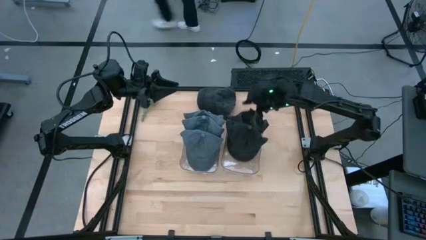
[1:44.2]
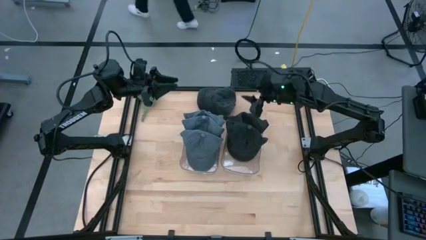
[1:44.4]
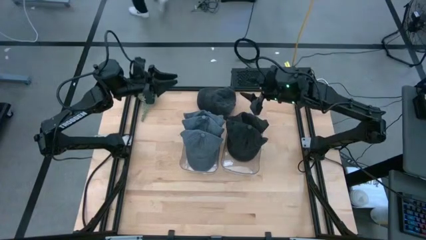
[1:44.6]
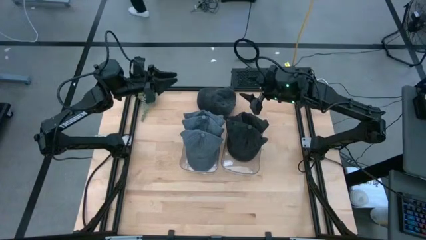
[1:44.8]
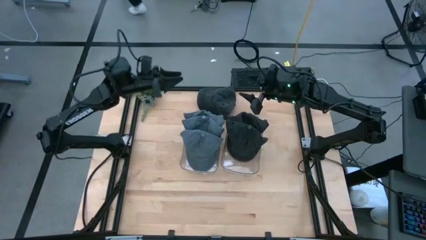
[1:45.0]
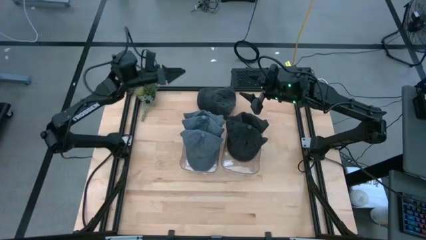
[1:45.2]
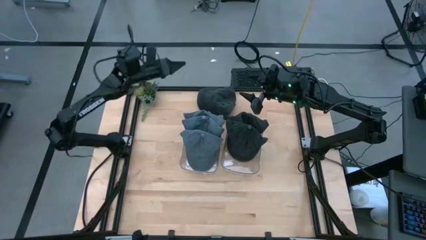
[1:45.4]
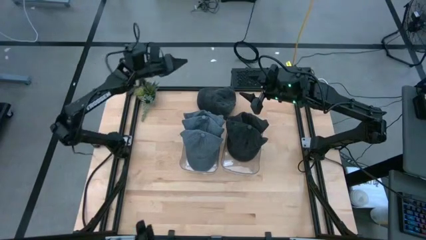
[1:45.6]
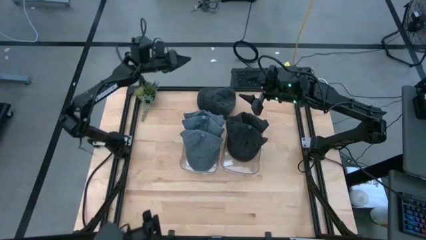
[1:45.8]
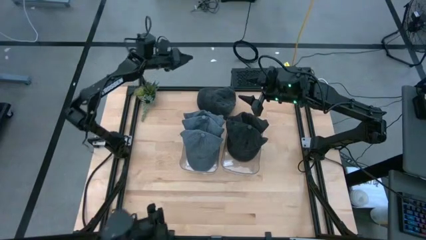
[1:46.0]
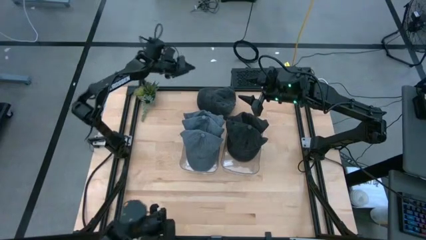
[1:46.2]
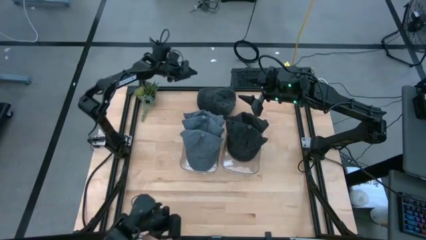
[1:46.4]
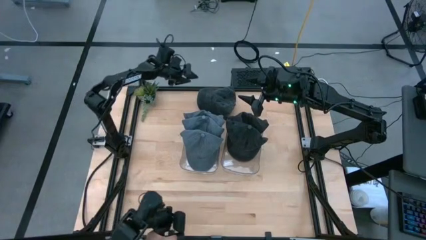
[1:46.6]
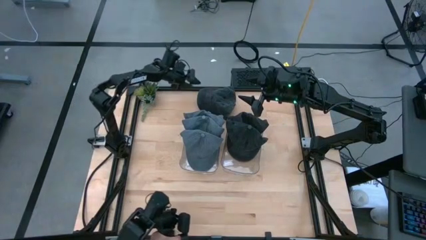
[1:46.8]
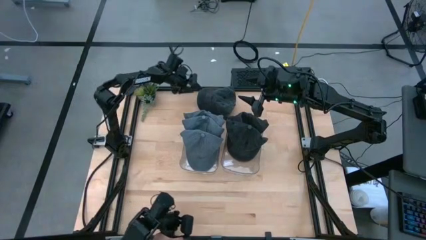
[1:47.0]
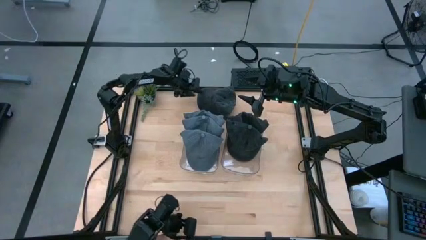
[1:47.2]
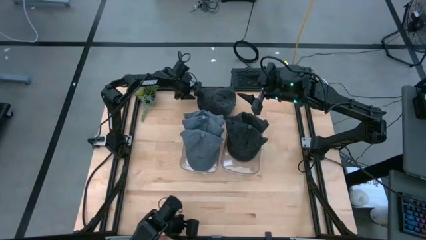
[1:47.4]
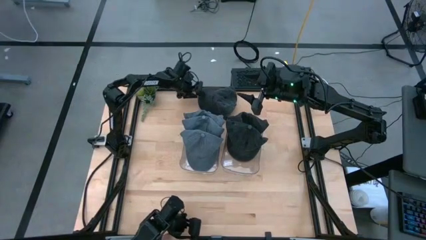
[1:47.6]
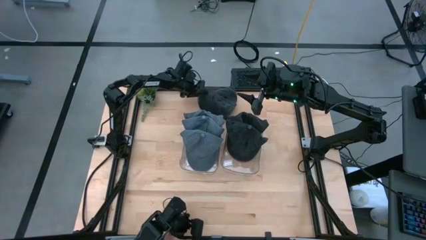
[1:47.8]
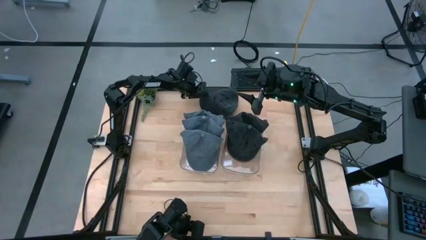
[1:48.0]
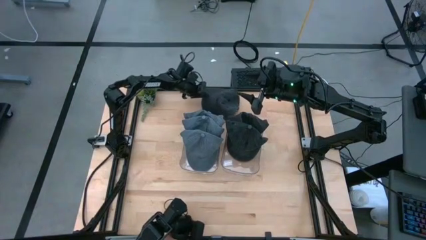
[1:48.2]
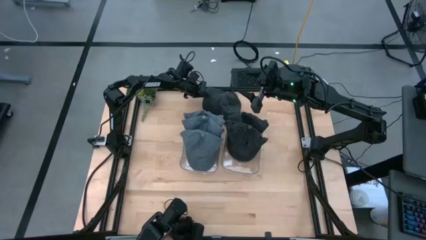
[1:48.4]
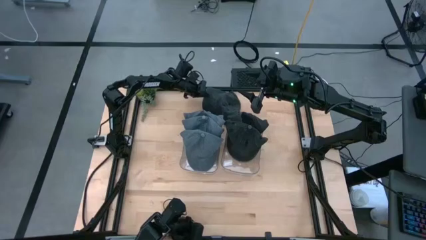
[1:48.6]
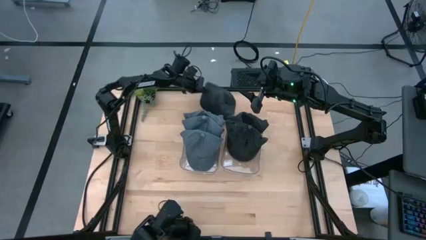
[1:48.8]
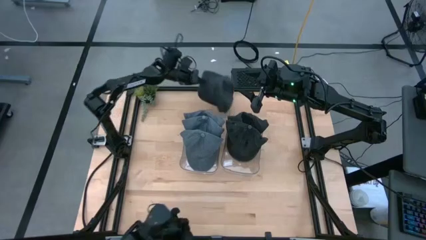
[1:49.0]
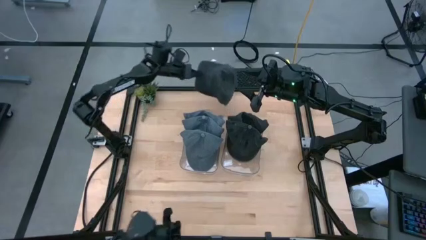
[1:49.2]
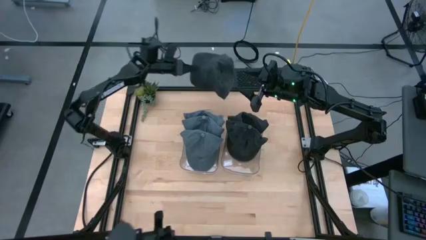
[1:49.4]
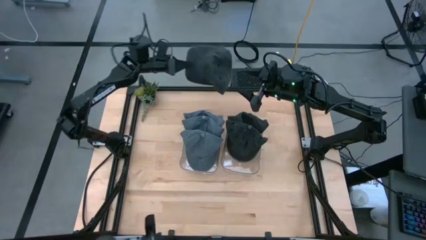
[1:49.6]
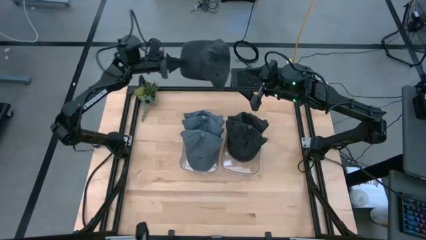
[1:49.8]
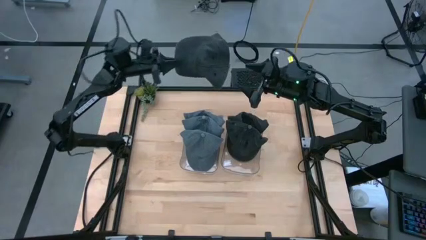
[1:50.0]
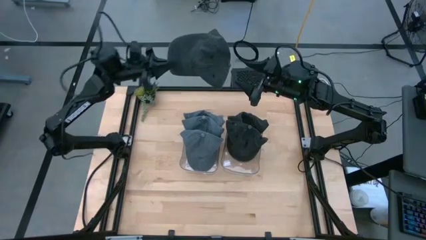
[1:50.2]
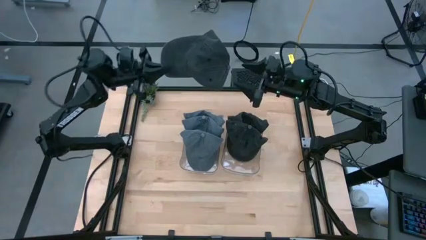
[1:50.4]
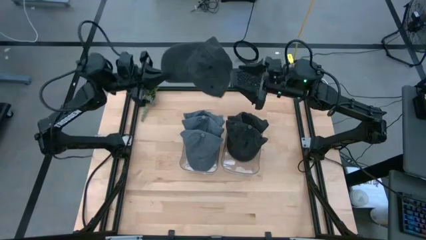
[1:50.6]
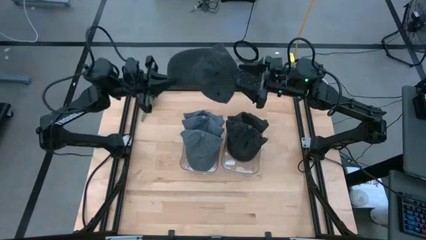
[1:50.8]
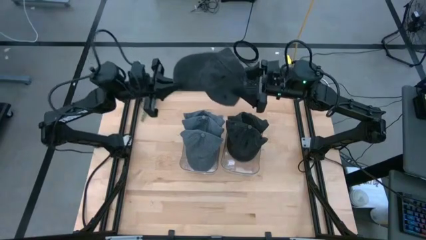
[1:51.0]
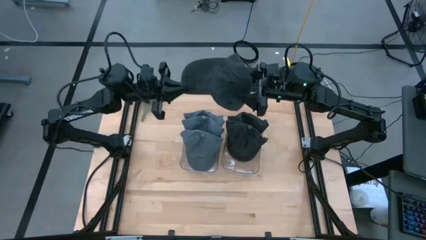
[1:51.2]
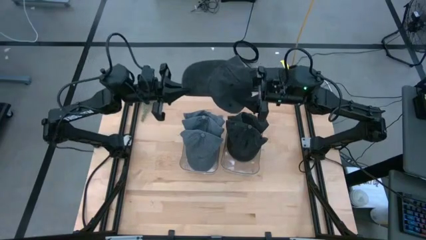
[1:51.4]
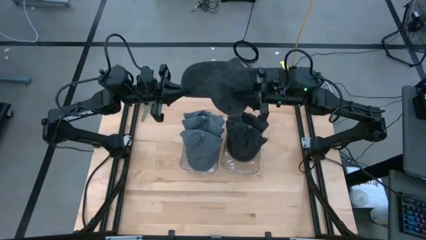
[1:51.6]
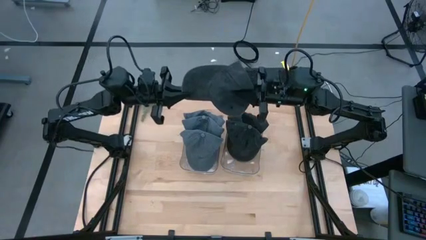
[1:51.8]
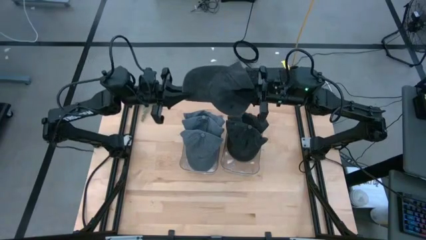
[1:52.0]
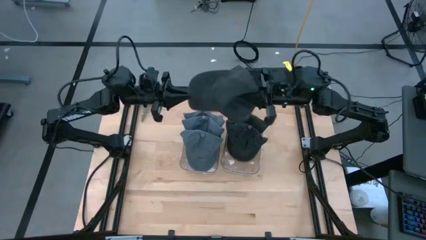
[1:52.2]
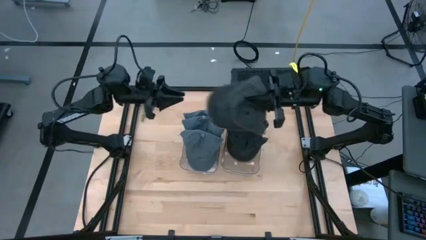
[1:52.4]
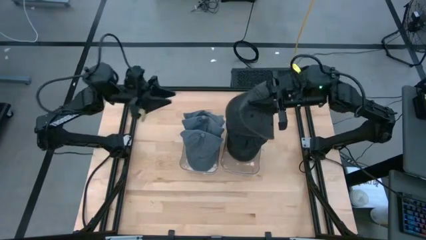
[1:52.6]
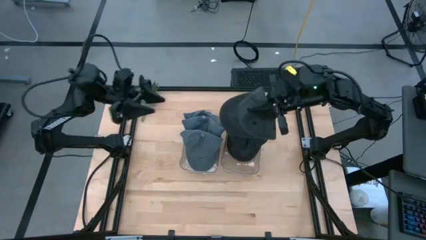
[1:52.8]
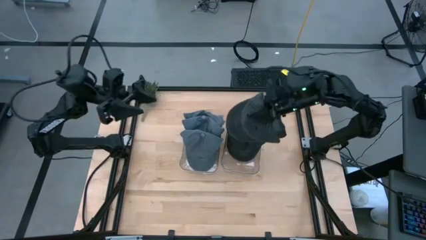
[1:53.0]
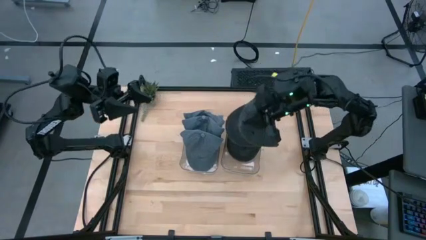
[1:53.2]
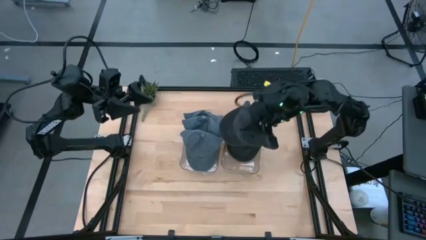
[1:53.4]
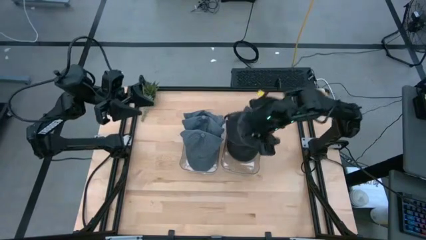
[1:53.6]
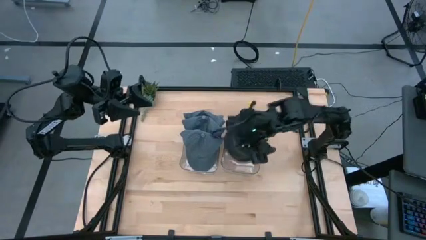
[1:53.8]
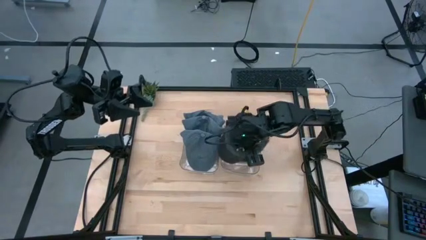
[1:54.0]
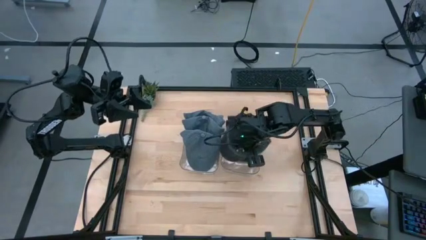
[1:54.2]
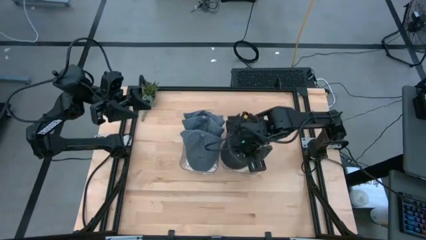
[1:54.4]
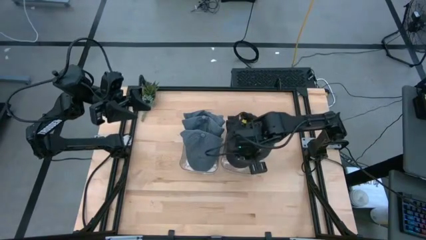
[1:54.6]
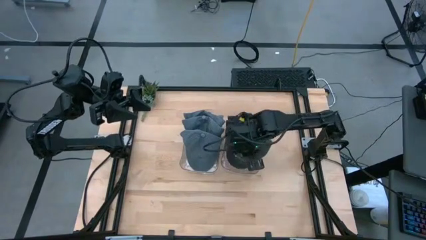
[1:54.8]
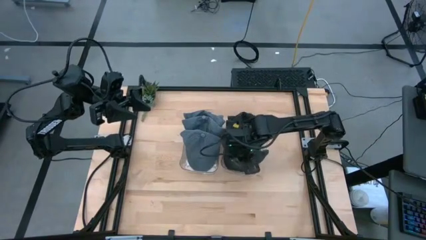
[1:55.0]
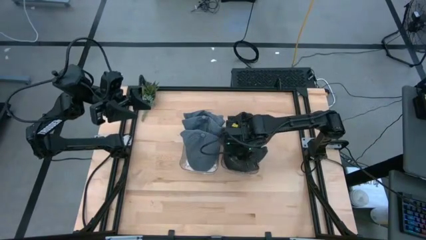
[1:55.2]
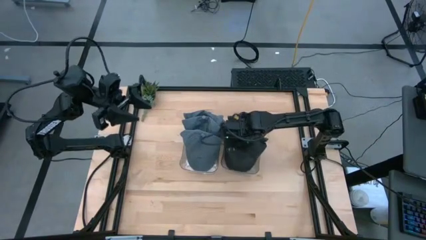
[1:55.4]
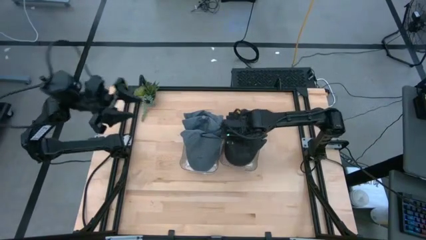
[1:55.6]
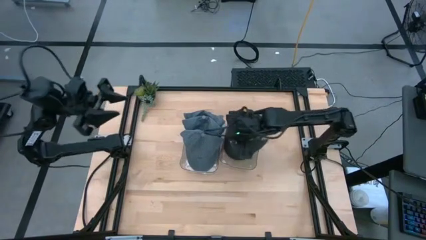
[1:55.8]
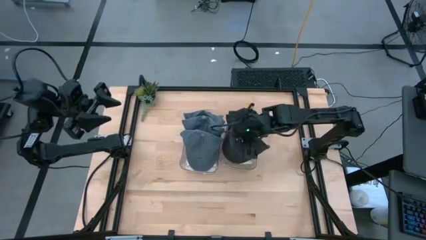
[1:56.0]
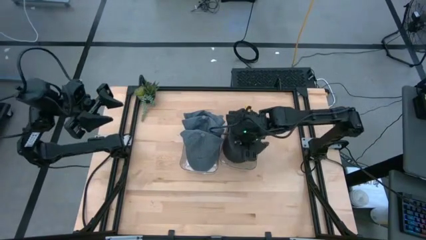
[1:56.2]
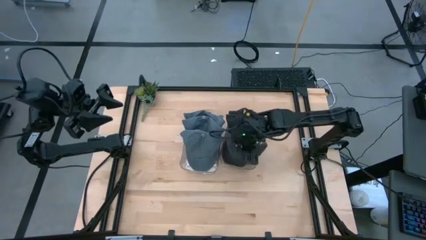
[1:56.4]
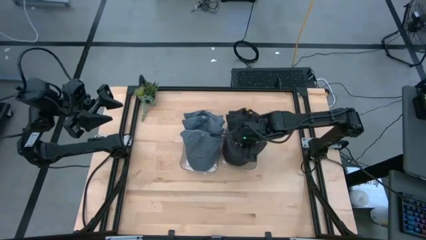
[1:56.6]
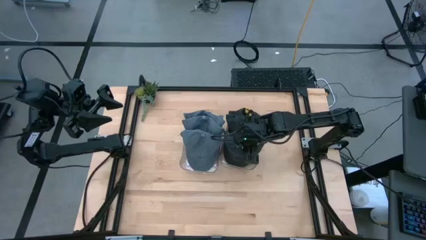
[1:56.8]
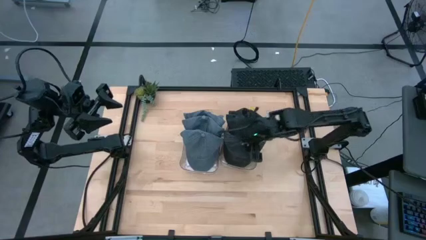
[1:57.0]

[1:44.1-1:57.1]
Task: Pick & Place hat
Put the black cap into the right transparent bin

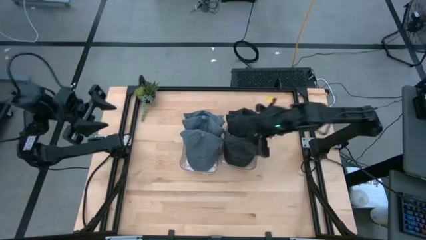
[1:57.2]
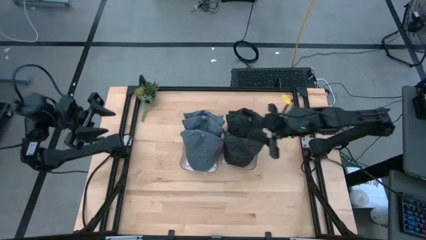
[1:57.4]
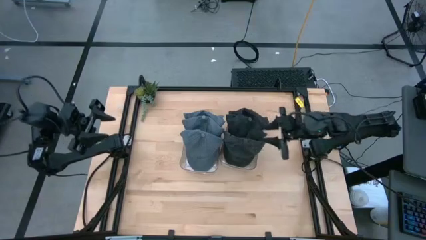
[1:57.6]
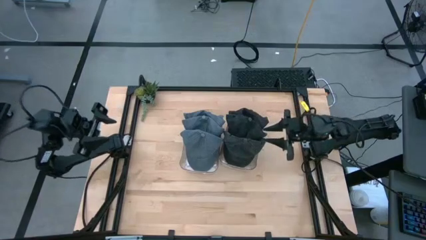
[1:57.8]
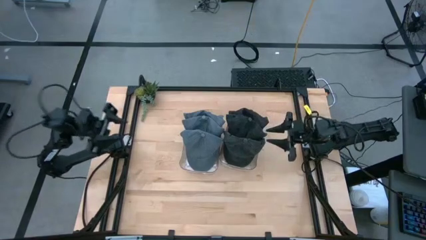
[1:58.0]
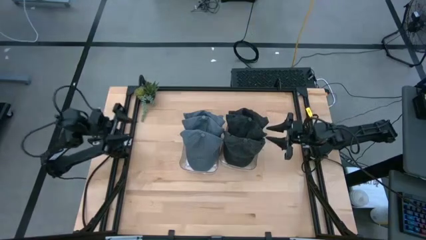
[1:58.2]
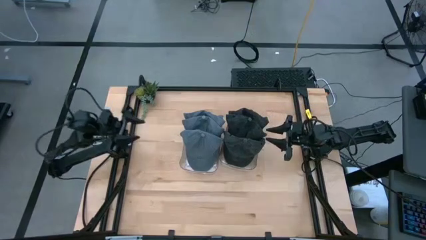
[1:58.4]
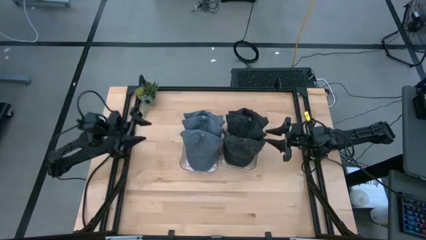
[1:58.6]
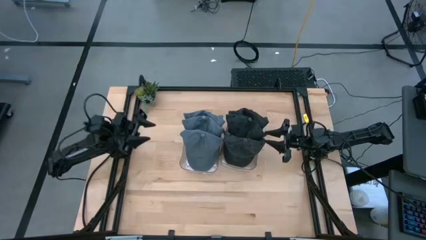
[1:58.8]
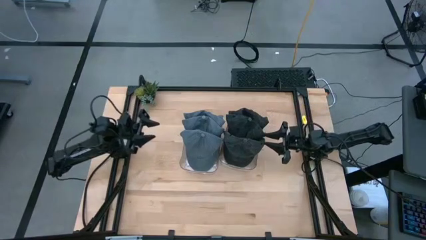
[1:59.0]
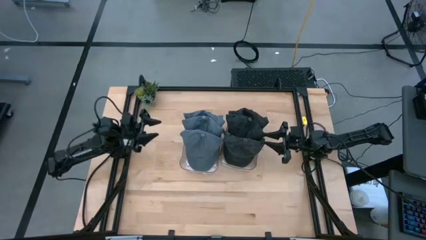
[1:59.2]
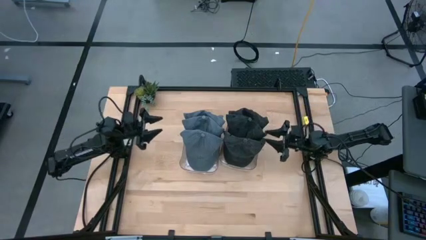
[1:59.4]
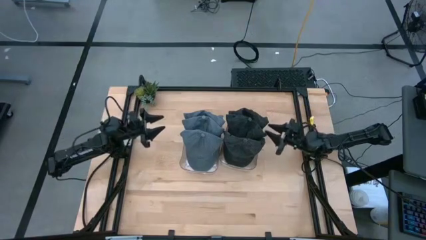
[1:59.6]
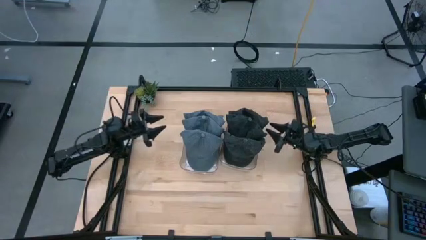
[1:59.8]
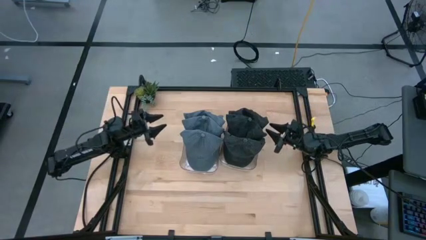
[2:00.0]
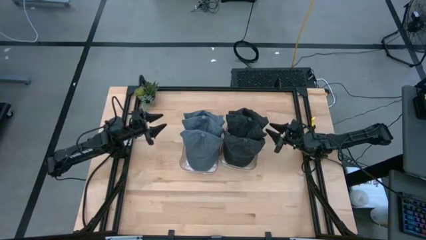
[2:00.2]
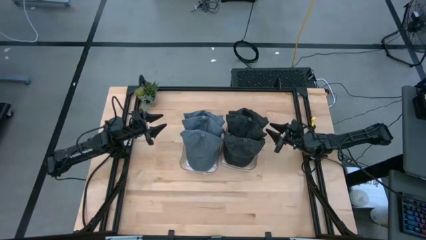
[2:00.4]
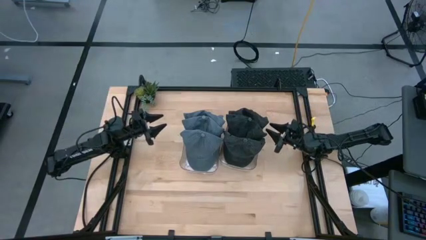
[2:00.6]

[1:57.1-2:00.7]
Return to Home Position
